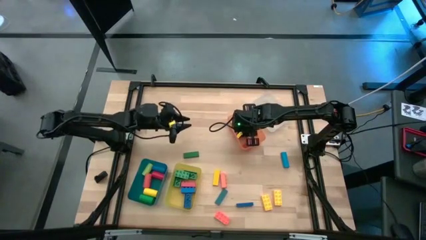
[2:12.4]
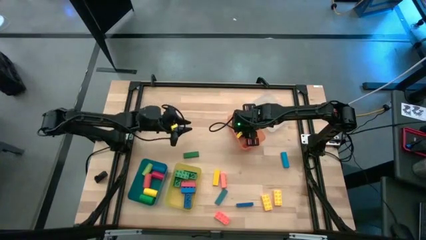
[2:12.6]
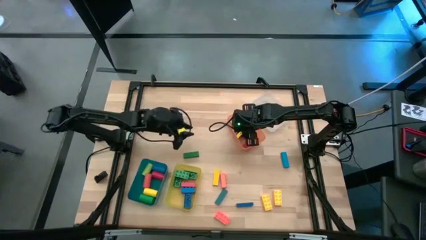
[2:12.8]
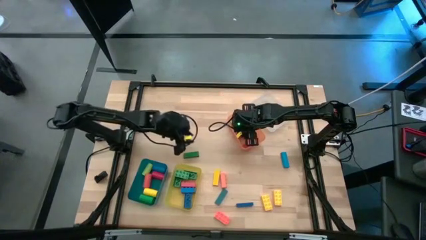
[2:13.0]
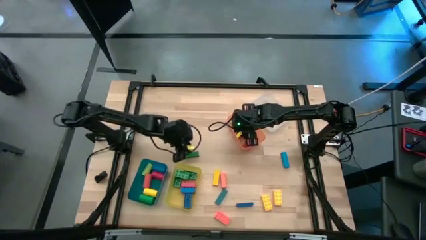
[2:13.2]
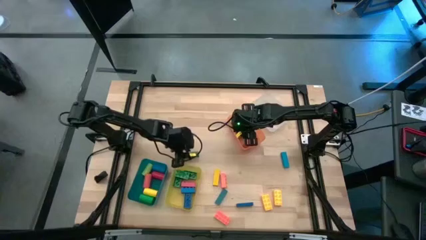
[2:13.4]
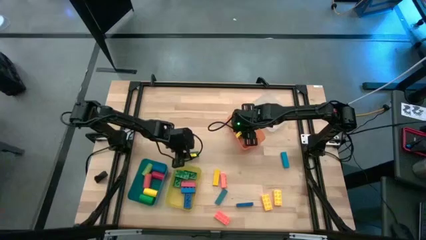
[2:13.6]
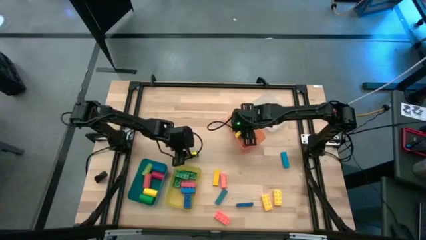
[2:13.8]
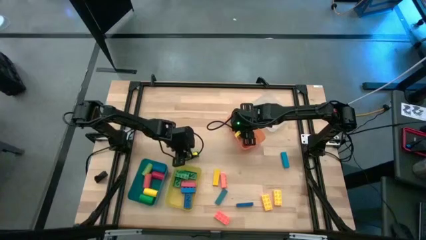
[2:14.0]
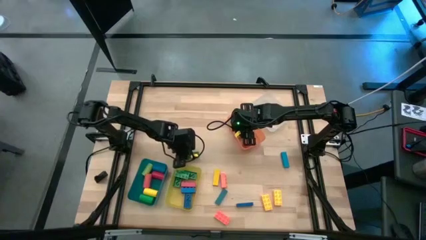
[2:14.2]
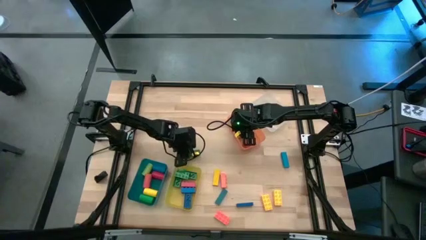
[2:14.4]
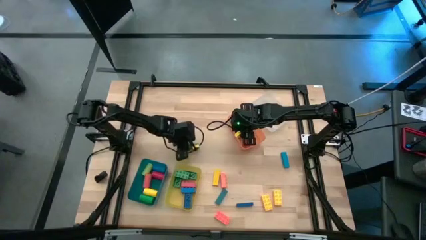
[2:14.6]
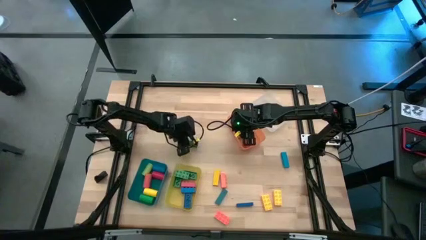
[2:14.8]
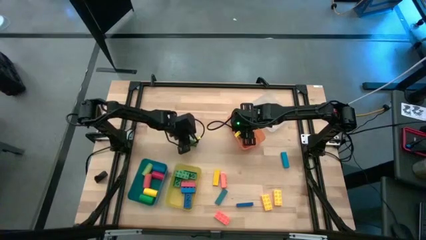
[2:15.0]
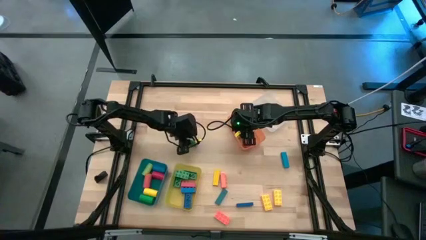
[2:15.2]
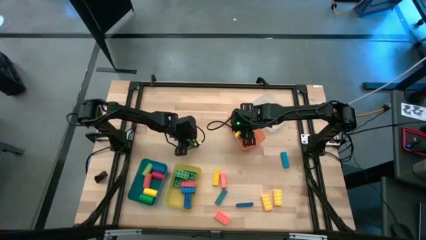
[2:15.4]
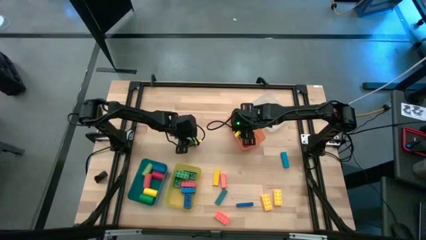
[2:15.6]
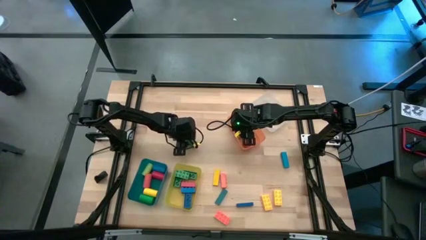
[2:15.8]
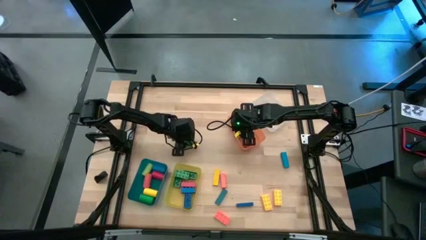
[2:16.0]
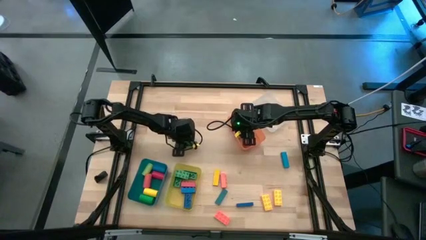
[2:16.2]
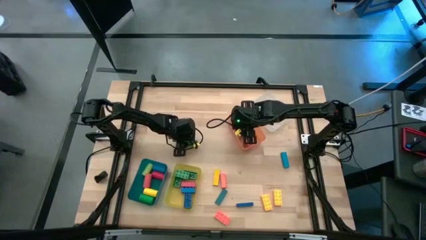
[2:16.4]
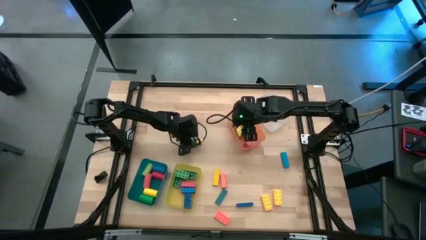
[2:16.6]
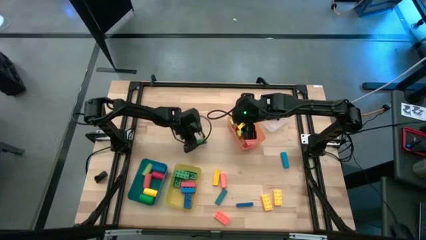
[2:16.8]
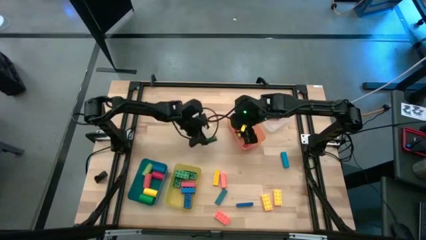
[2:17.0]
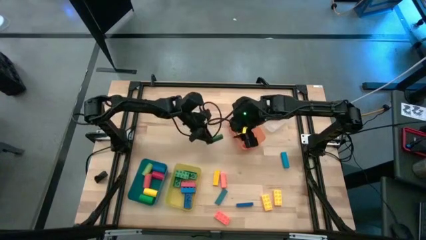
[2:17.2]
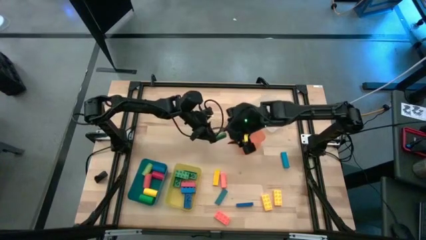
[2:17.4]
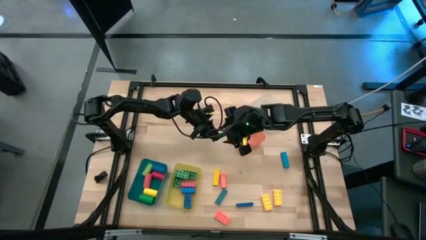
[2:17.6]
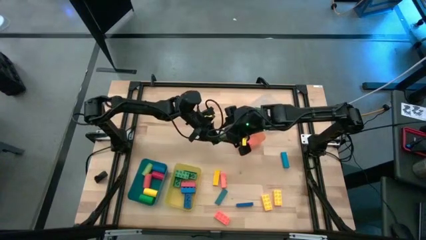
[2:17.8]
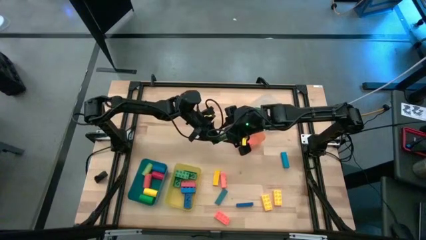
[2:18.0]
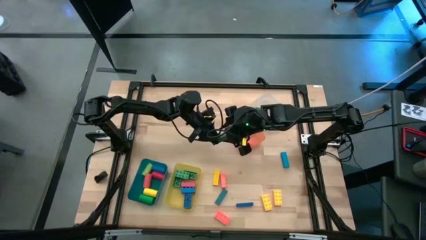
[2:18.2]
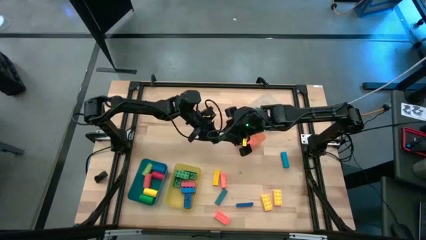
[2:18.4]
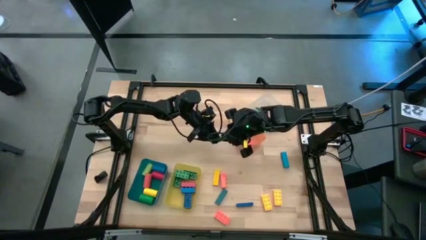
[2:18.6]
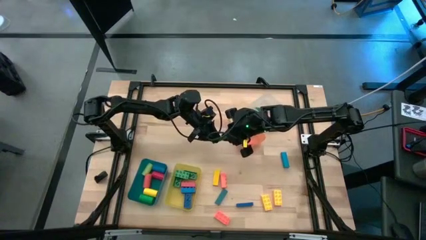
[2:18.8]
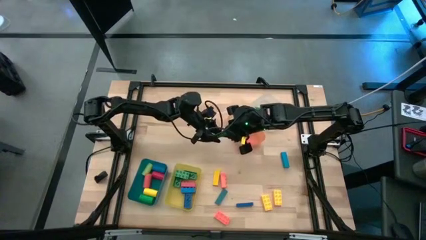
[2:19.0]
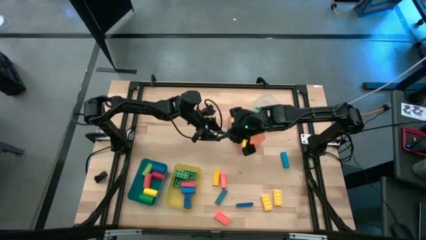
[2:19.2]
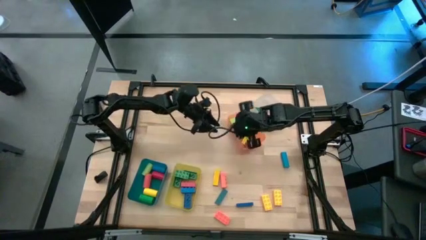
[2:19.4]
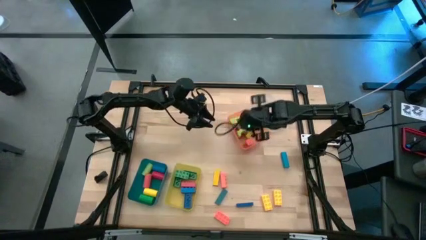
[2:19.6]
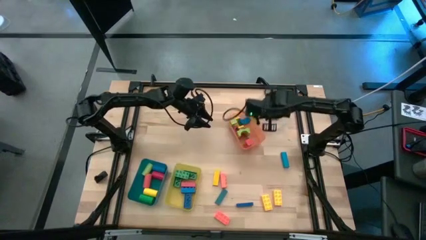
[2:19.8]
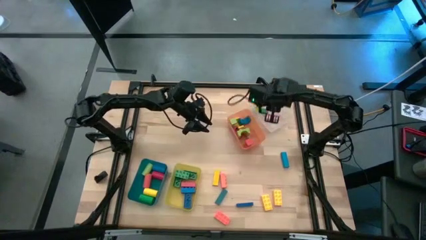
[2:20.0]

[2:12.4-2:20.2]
Task: Sort blocks by size
Put the green rectangle block into the transparent bin

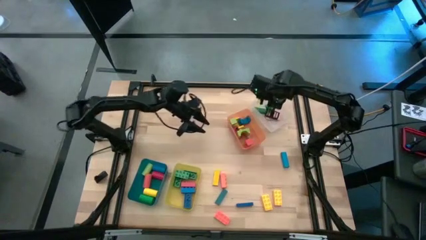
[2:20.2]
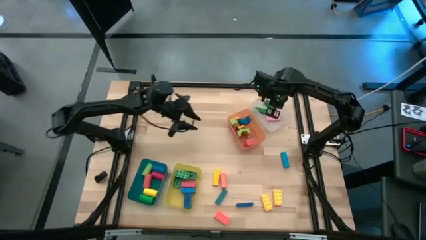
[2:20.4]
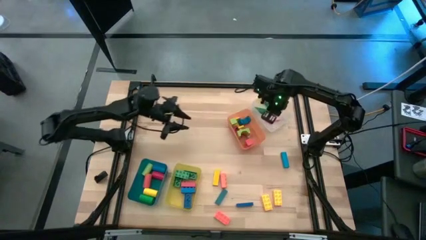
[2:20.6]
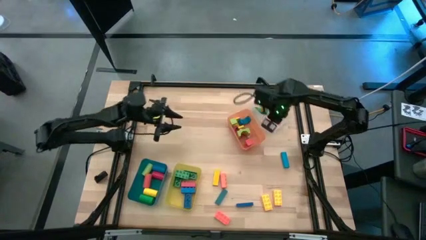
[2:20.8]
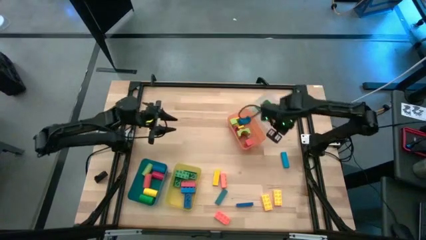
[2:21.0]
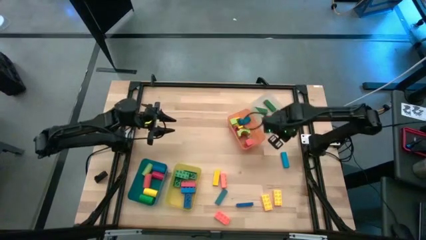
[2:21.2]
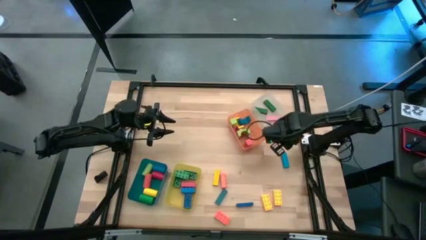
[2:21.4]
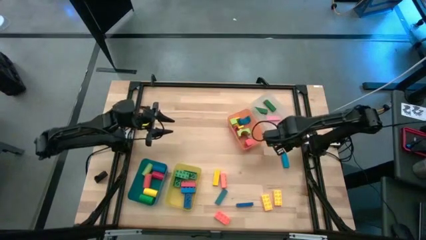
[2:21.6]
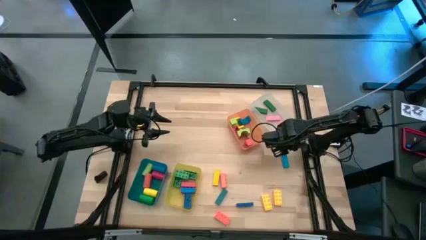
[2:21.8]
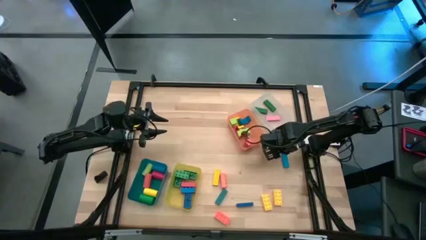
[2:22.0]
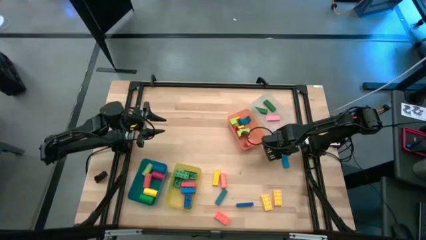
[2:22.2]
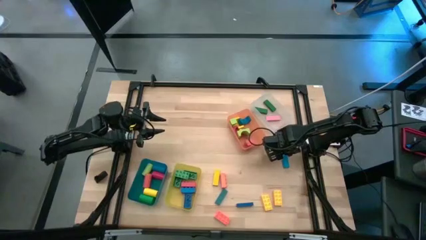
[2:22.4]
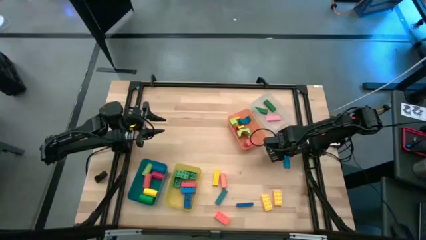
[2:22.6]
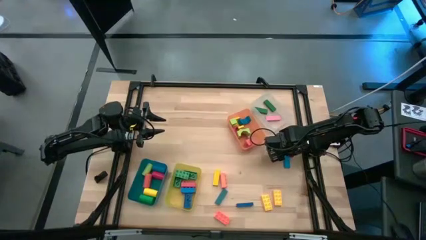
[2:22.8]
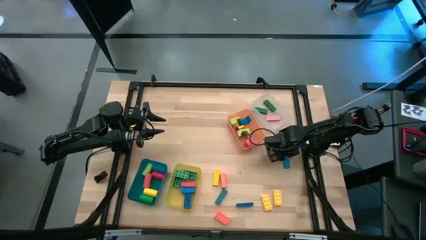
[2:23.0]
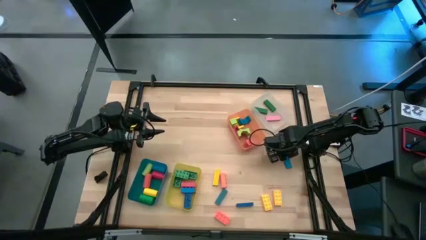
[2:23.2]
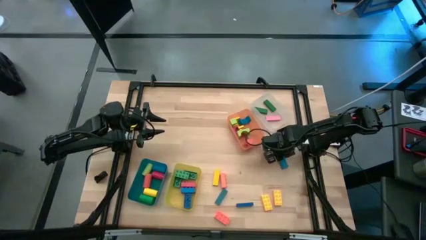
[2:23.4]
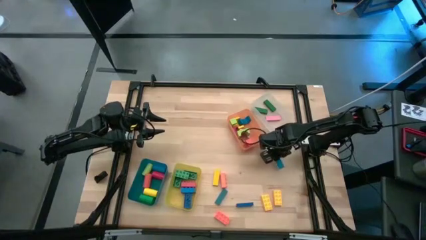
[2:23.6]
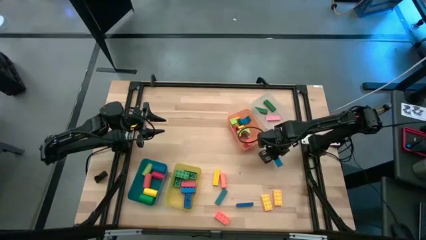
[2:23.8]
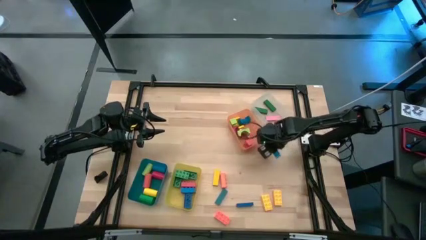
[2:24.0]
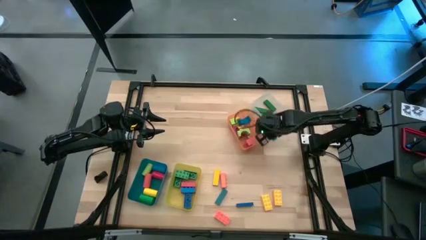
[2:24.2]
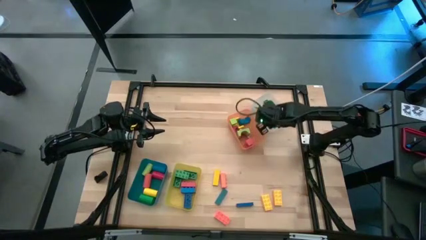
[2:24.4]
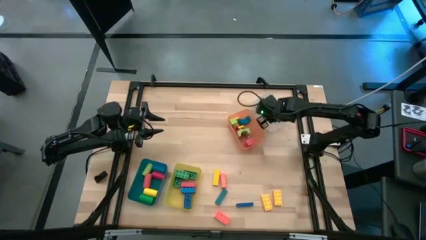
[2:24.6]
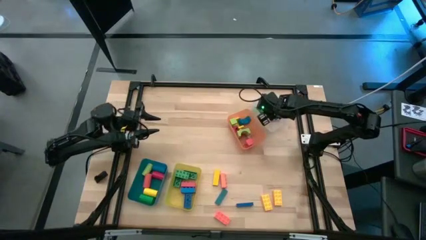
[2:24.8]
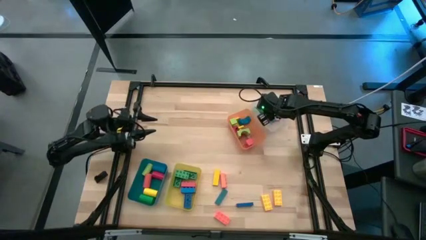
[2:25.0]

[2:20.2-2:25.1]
Put the blue rectangle block into the transparent bin

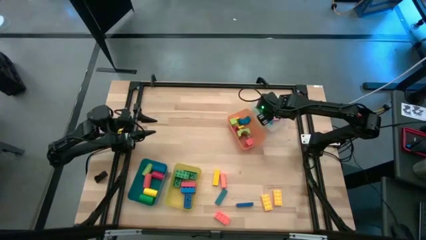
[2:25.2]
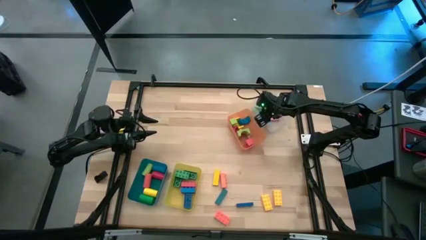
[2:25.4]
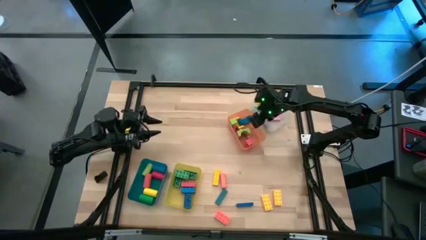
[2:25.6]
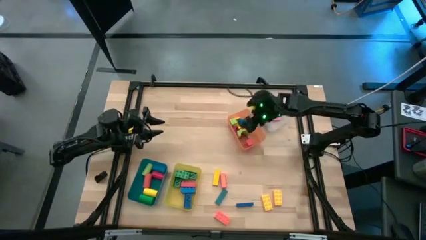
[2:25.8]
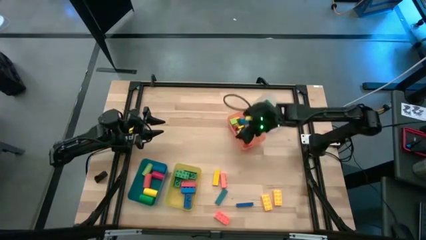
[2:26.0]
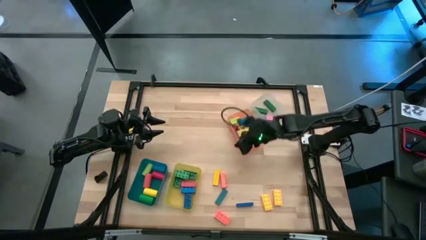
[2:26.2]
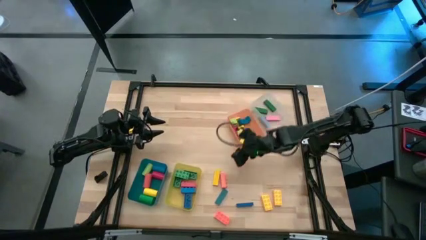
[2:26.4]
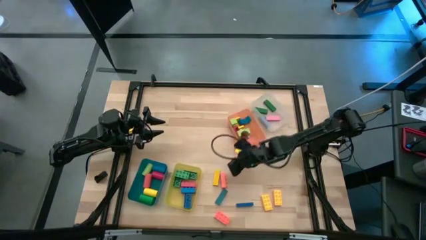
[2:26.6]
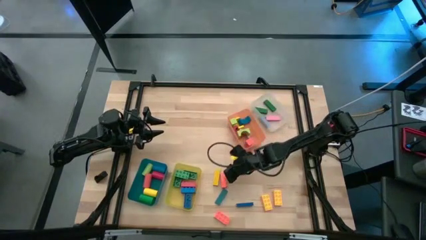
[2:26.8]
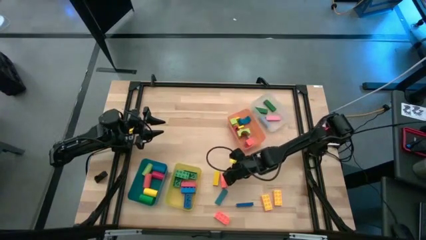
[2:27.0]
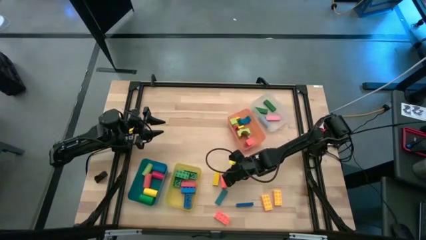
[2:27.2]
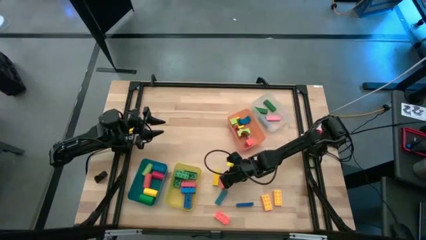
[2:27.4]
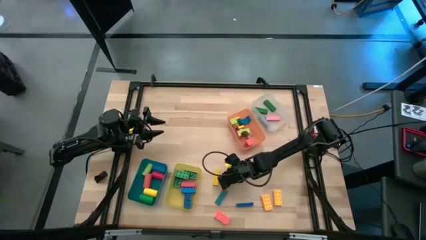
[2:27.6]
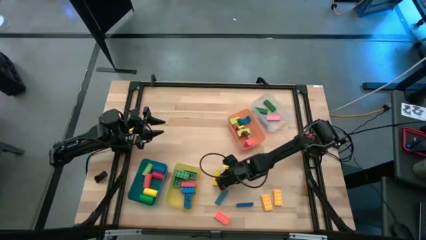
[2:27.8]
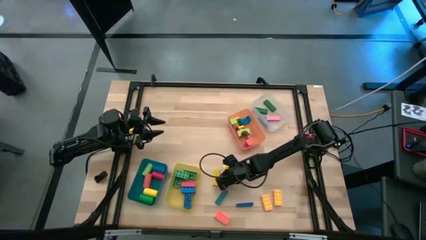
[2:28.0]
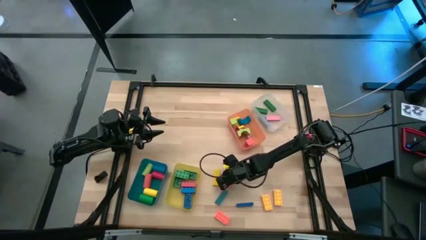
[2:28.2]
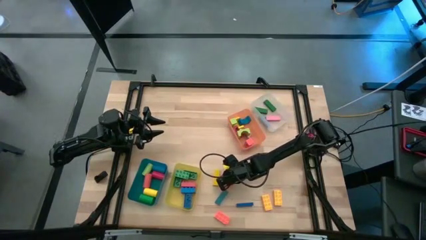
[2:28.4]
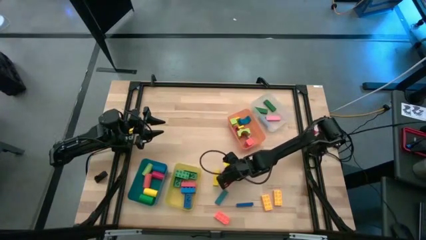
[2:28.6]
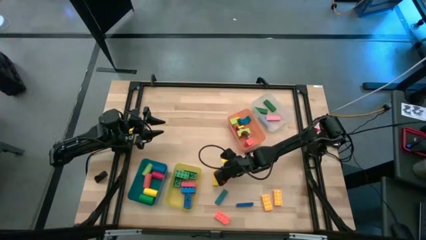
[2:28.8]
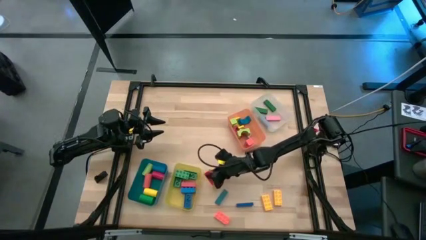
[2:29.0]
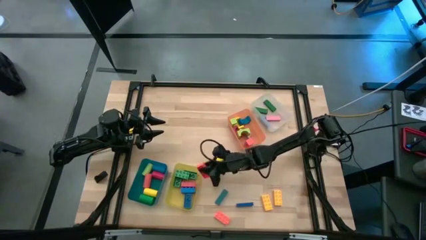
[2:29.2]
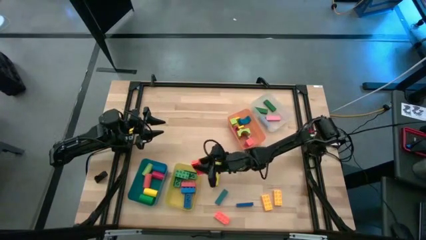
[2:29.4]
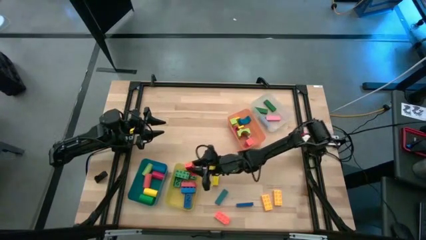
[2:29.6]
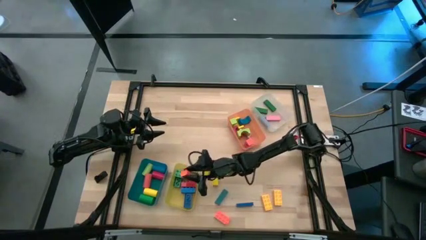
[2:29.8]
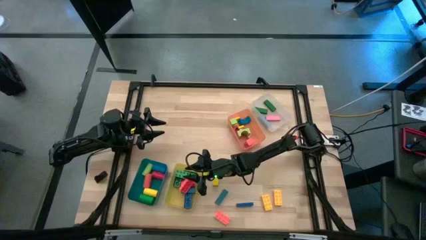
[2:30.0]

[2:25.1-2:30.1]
Put the orange rectangle game piece into the yellow bin
